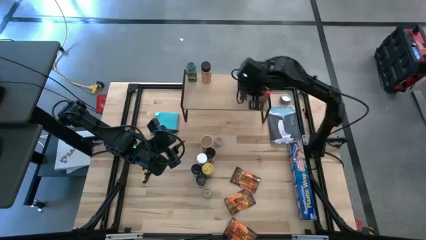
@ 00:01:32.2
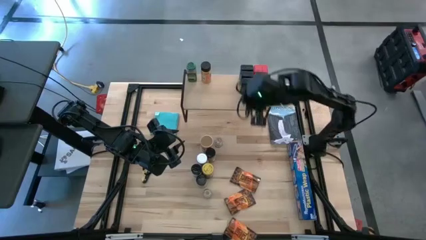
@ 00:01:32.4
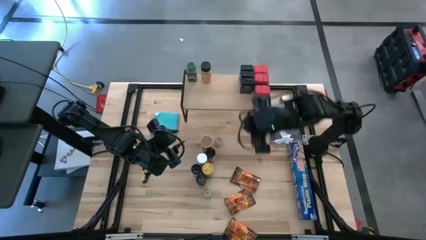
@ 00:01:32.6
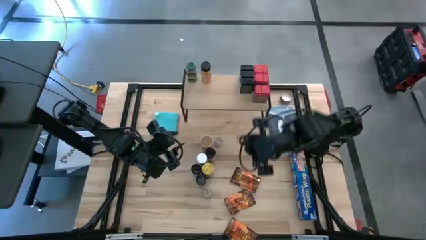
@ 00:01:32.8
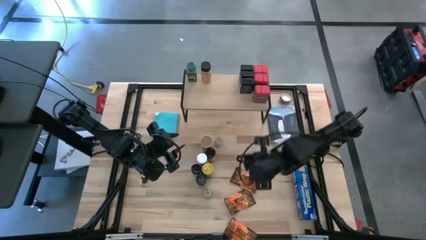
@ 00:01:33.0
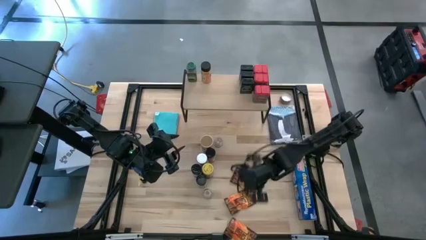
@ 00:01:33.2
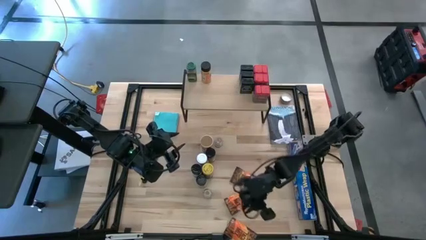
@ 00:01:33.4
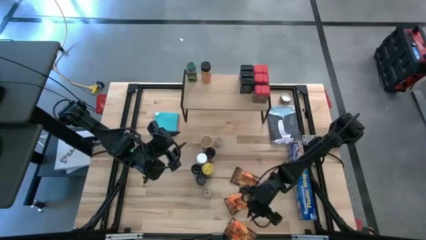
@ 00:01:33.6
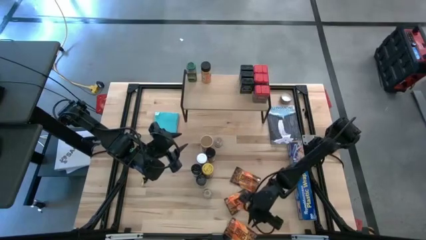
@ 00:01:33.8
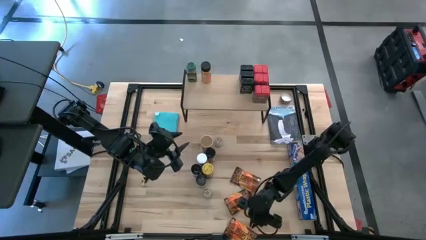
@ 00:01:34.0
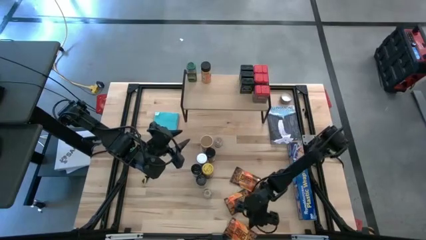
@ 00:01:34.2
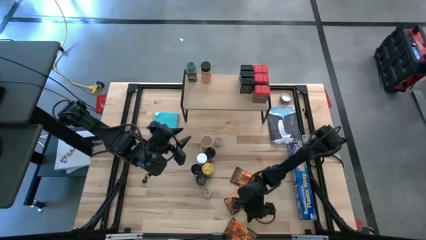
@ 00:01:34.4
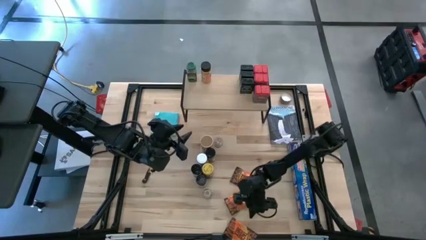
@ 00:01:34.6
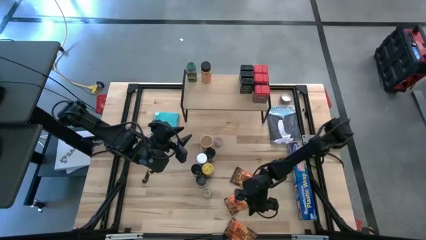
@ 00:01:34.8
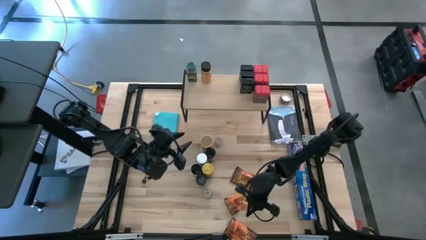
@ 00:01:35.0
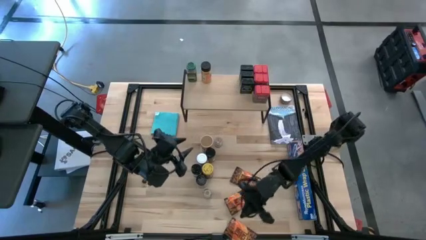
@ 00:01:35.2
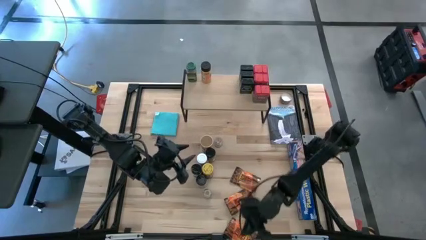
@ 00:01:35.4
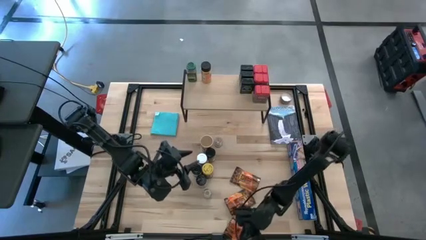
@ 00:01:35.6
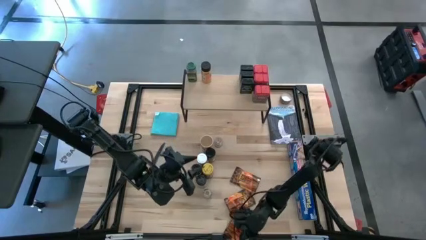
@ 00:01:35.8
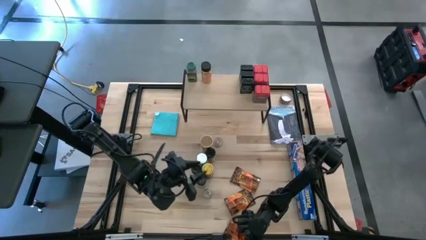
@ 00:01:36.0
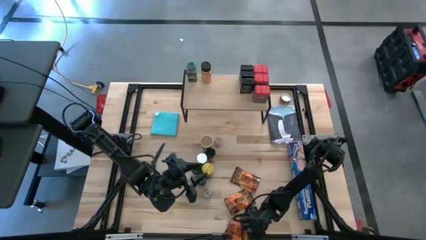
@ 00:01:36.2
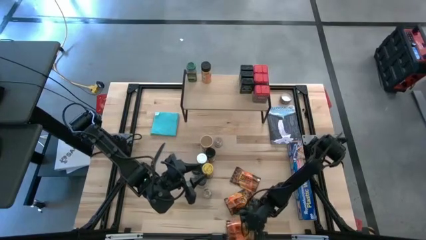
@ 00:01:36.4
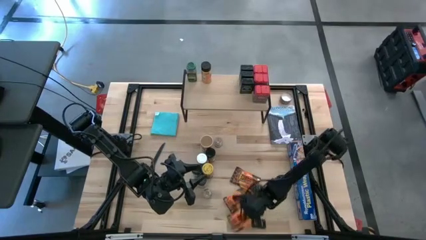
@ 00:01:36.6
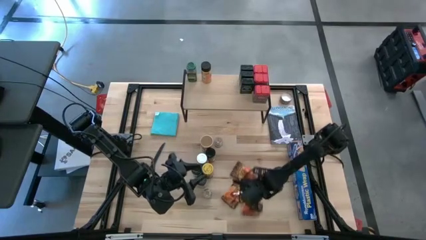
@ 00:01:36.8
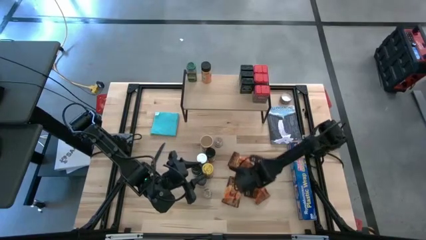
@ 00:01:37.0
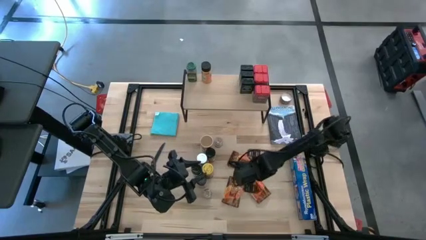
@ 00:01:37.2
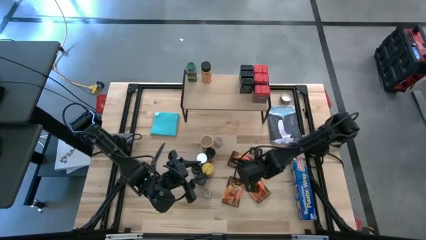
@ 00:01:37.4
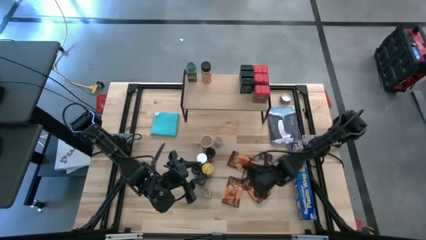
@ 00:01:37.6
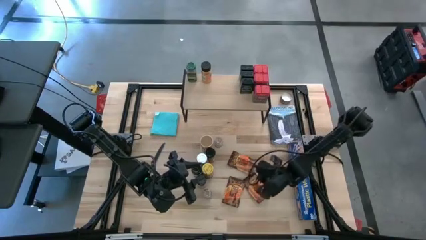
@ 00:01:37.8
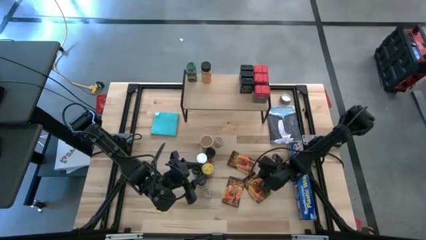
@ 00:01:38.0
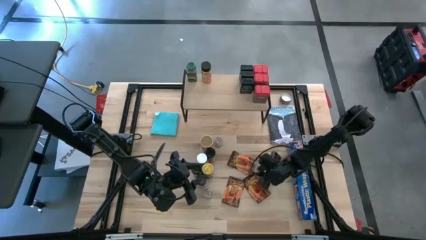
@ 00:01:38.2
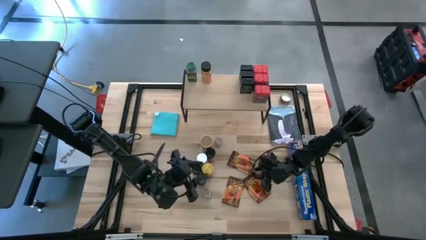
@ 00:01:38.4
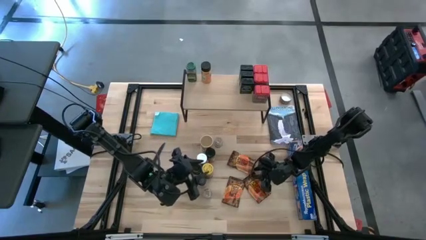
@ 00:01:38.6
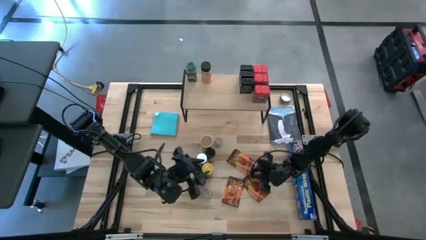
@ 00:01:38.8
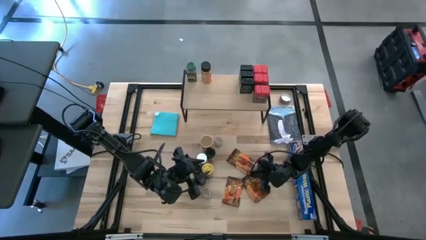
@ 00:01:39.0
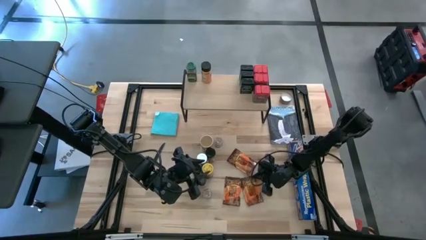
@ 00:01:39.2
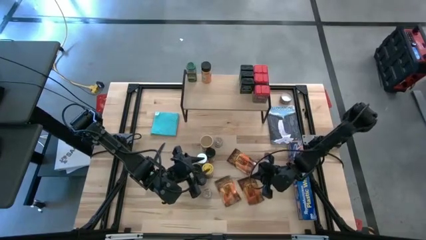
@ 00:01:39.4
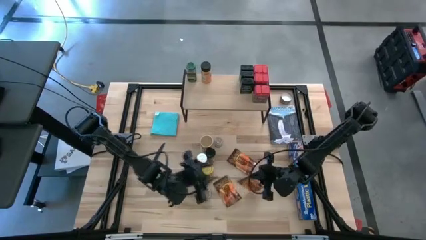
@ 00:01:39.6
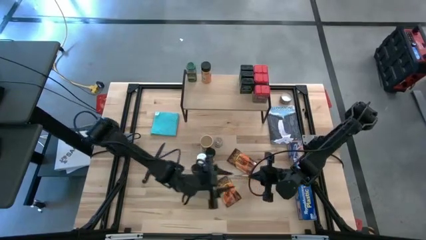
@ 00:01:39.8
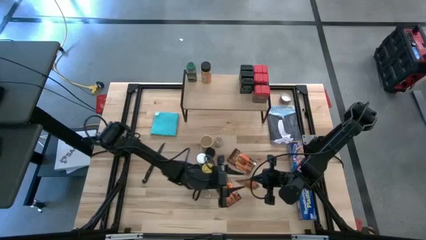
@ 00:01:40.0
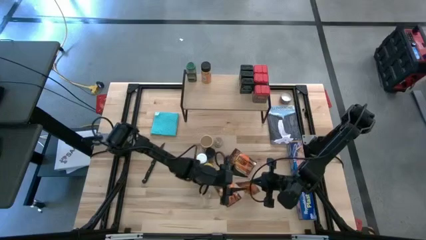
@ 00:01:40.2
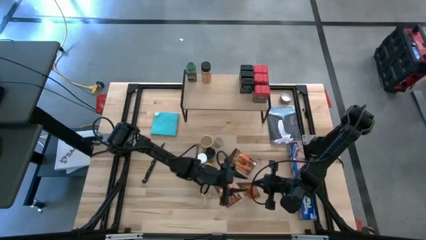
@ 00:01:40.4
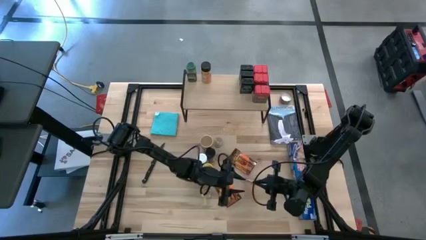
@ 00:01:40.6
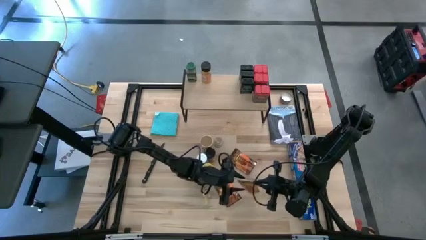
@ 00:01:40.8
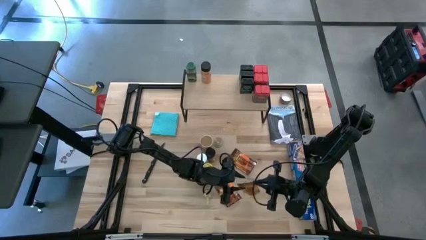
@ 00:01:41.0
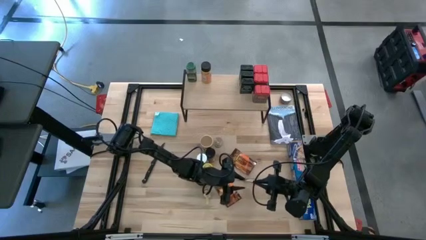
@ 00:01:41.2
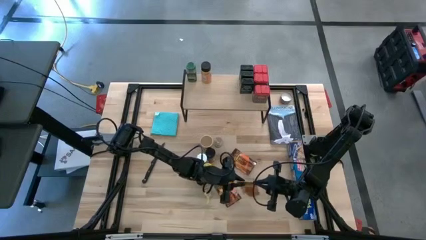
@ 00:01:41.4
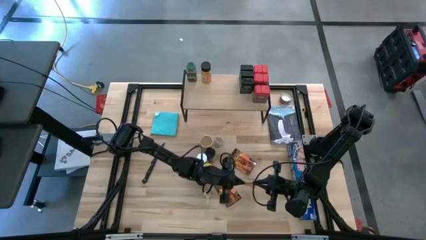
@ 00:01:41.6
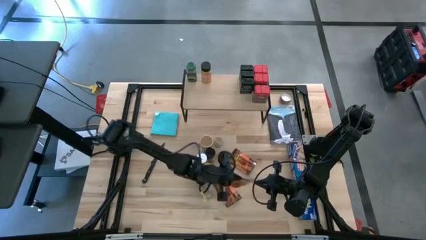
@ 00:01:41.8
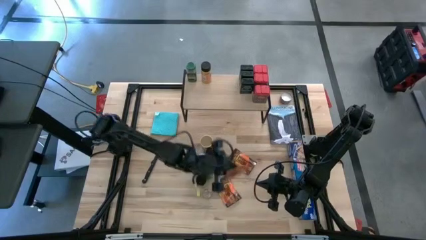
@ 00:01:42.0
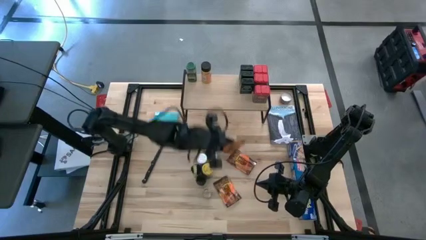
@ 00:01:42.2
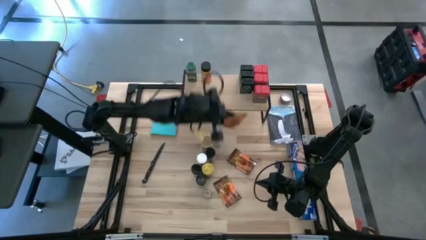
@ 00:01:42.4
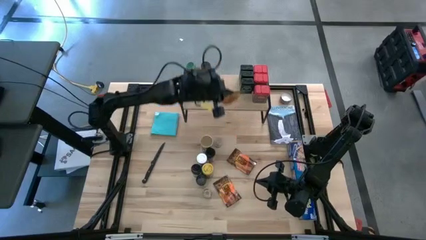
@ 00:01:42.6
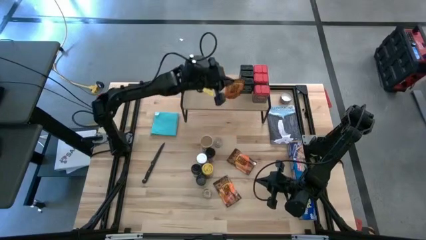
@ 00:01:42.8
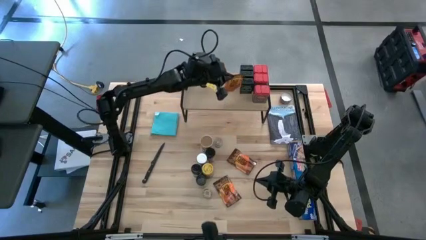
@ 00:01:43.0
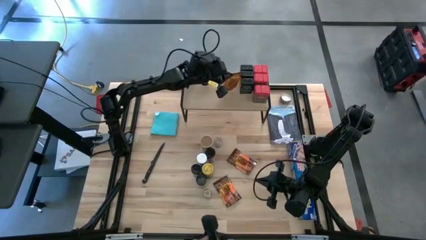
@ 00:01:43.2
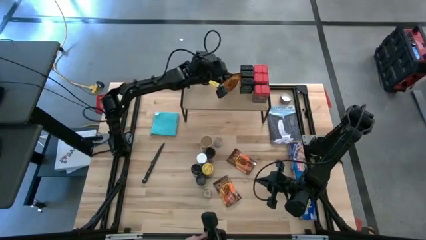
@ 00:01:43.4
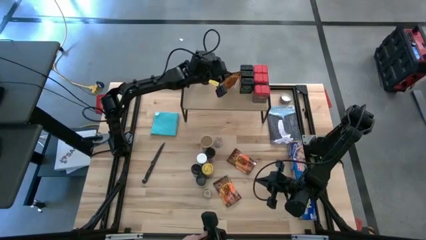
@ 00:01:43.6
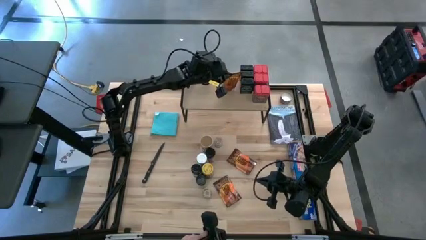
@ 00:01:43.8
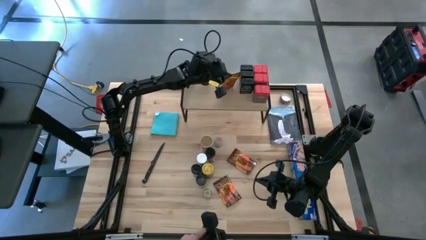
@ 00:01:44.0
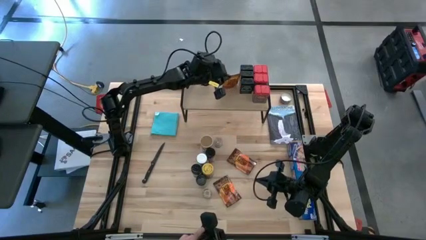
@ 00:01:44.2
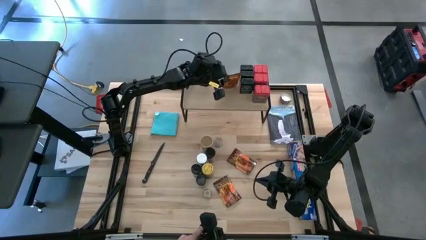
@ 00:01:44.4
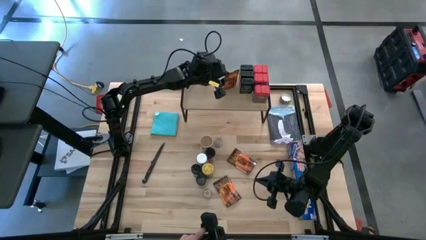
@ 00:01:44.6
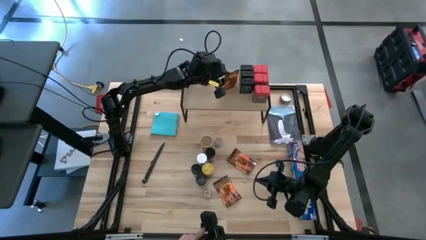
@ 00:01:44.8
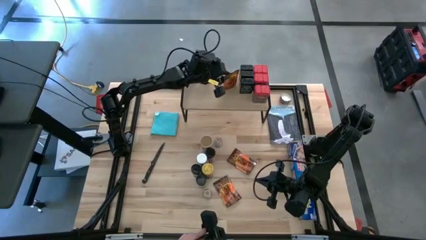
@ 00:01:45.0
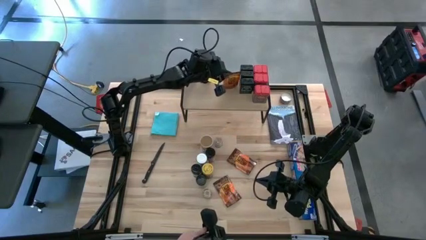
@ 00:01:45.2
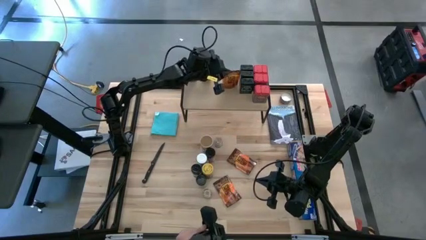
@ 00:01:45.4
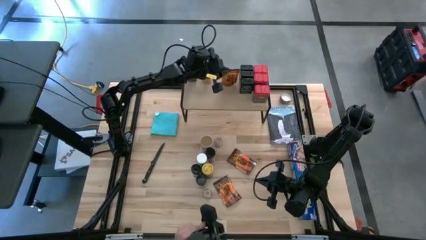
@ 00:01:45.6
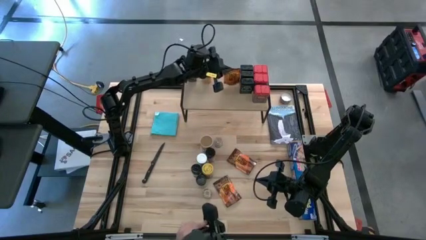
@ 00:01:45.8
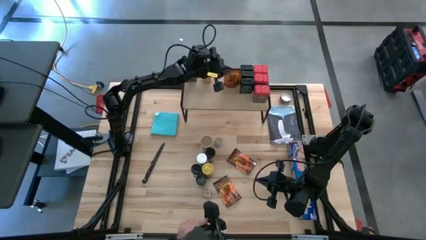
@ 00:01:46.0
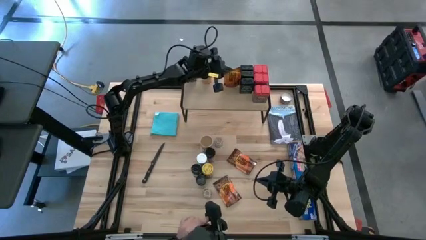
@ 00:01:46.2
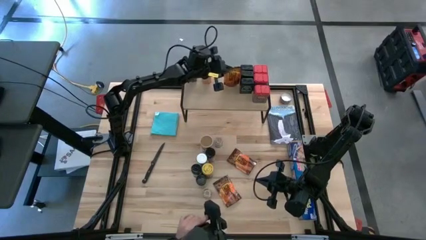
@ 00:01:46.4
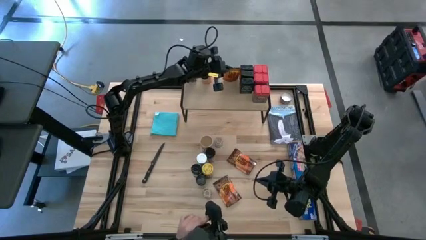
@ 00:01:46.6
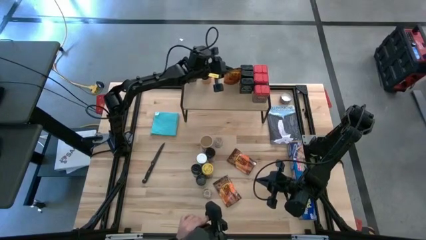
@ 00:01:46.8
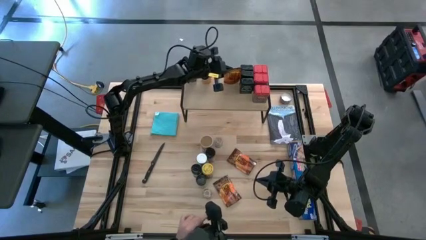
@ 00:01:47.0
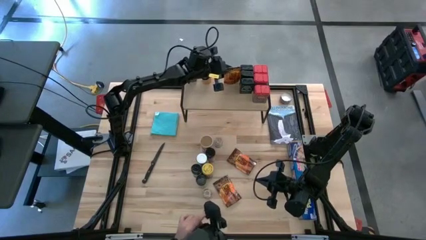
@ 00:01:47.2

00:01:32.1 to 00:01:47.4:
Task: Shelf spices
Put the orange seasoning pack on the shelf

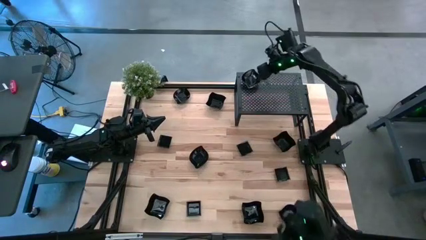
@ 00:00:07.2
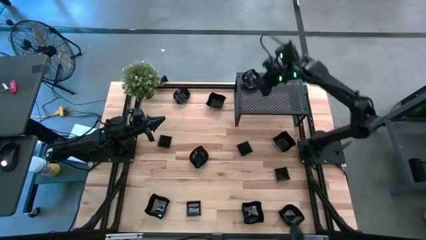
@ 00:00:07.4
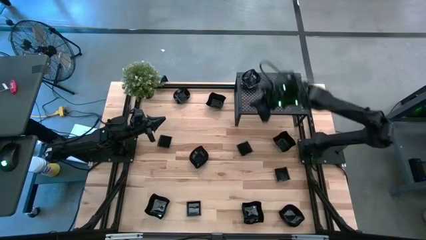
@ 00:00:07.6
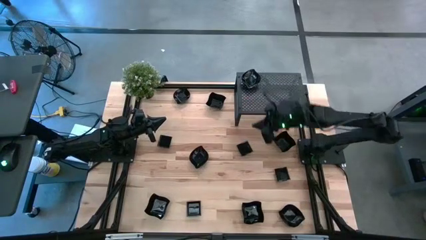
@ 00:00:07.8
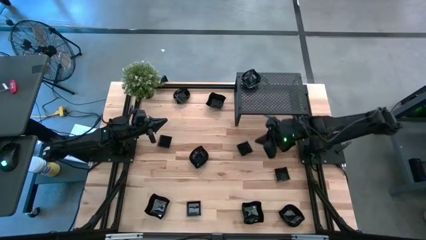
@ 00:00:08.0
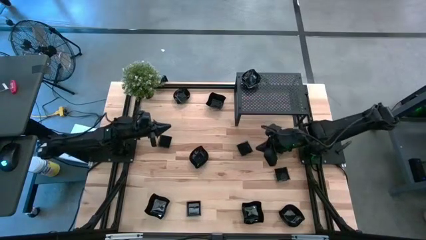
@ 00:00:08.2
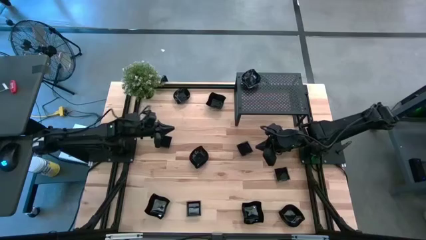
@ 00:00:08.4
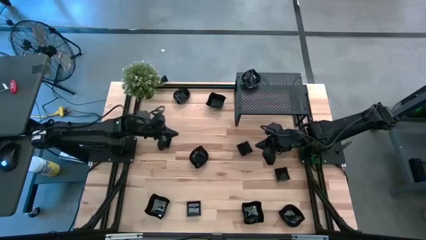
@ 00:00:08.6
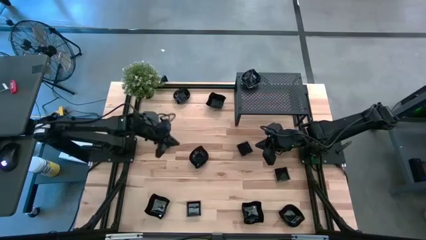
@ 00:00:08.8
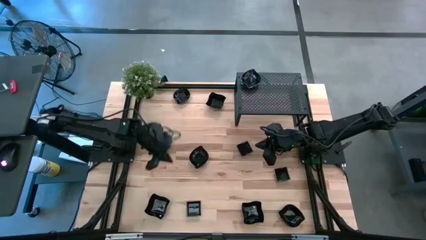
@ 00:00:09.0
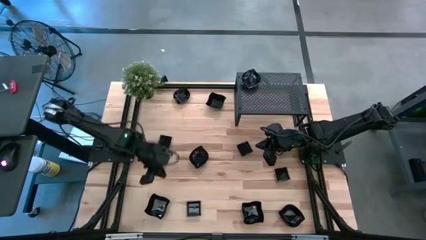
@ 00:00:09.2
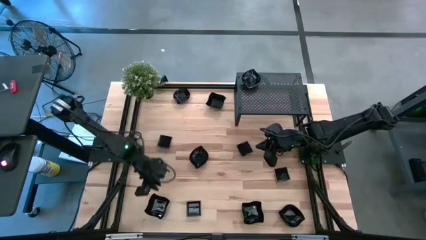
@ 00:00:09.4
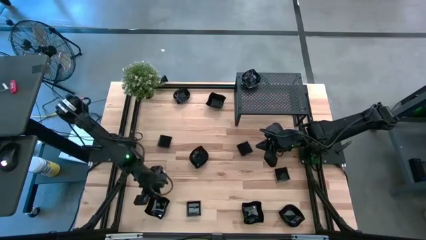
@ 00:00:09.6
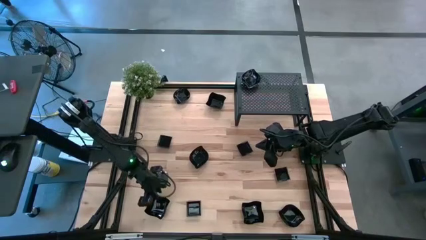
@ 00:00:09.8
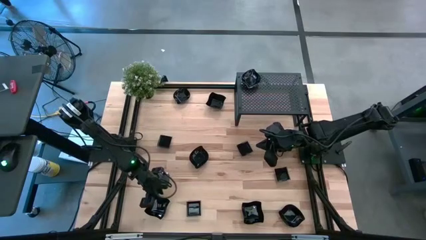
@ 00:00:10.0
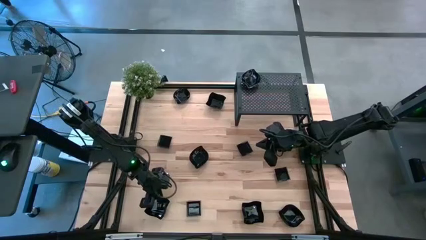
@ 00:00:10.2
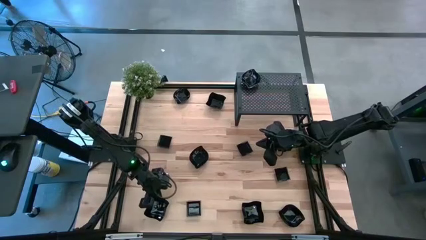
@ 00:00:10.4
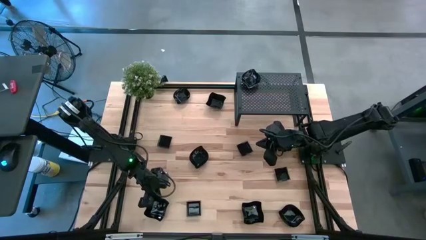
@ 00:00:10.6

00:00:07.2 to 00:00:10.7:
Task: Pick & Place Mini shaped plates
Put the black distorted square plate on the shelf
